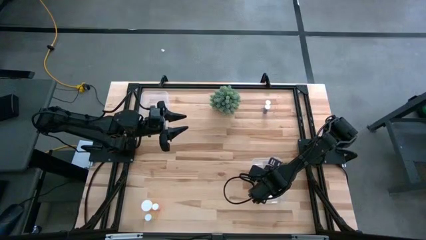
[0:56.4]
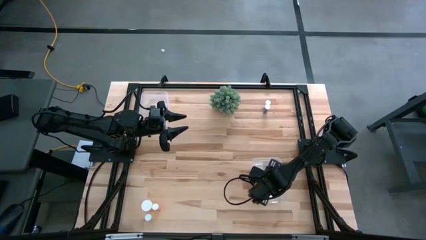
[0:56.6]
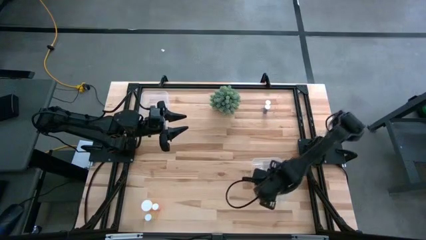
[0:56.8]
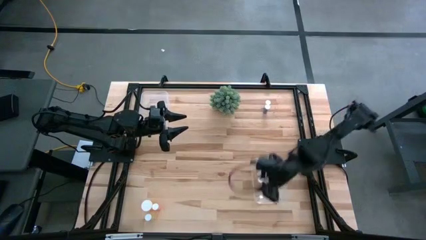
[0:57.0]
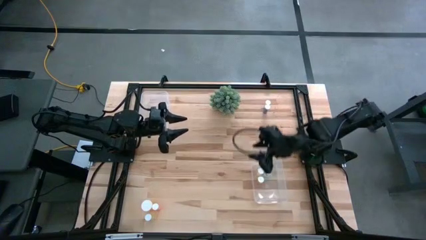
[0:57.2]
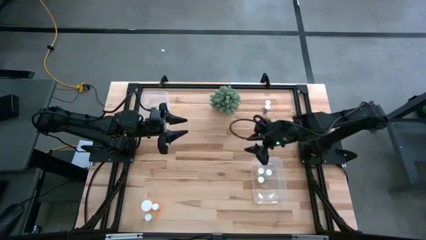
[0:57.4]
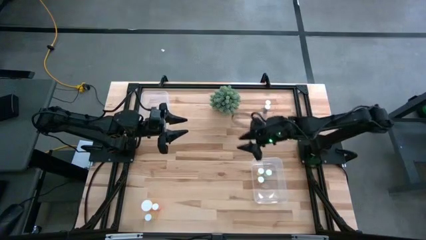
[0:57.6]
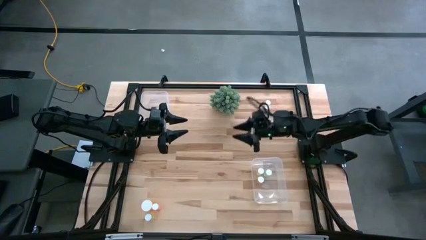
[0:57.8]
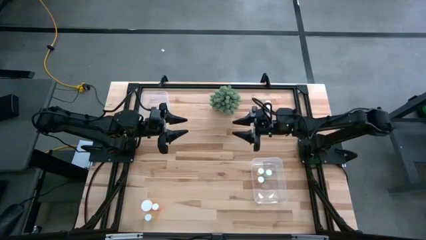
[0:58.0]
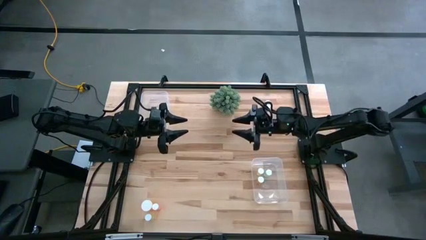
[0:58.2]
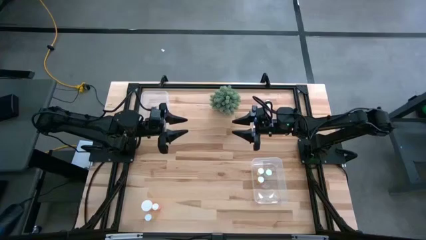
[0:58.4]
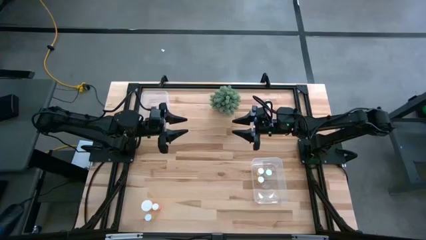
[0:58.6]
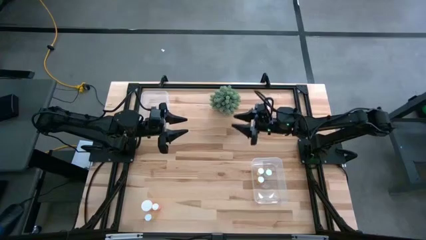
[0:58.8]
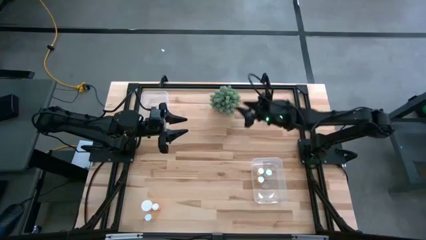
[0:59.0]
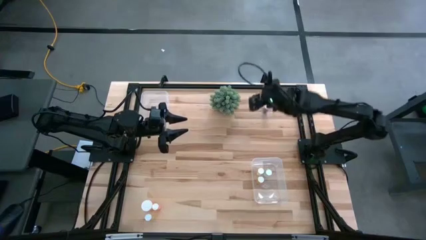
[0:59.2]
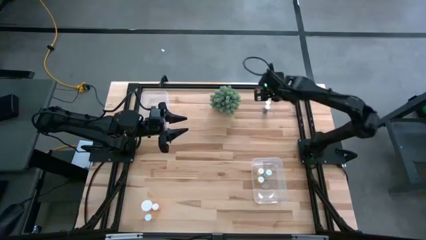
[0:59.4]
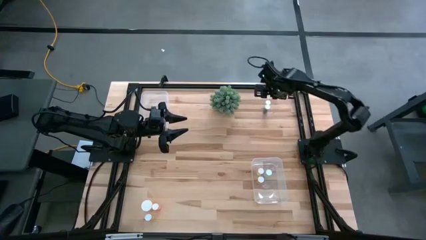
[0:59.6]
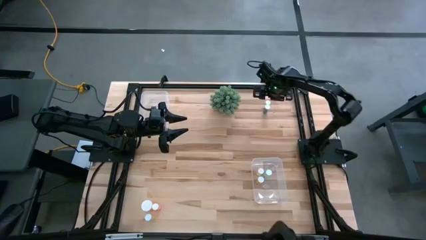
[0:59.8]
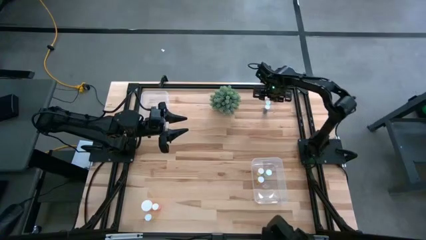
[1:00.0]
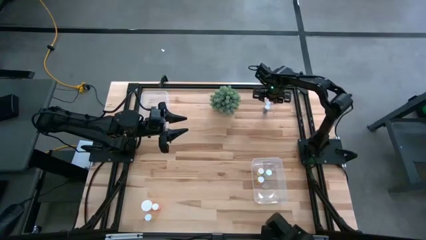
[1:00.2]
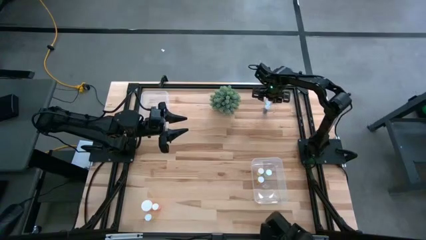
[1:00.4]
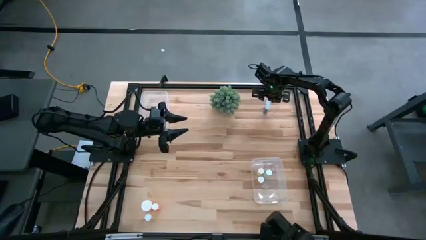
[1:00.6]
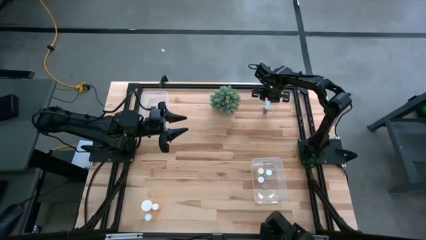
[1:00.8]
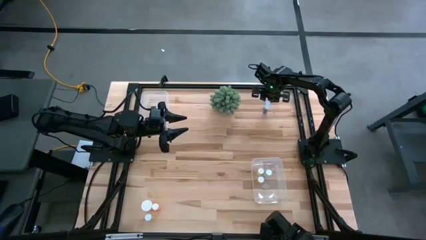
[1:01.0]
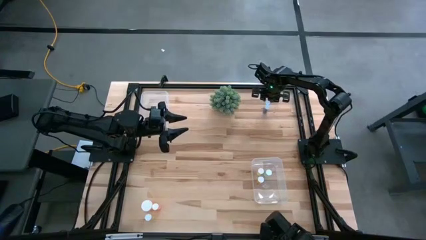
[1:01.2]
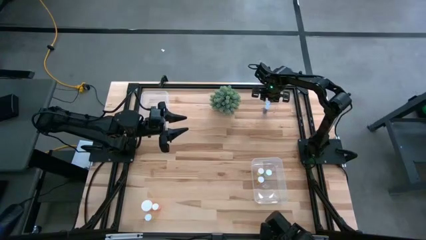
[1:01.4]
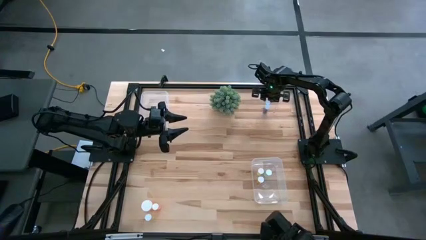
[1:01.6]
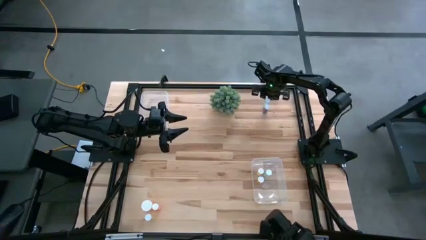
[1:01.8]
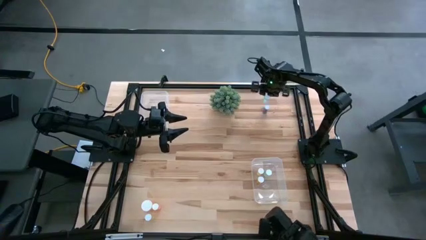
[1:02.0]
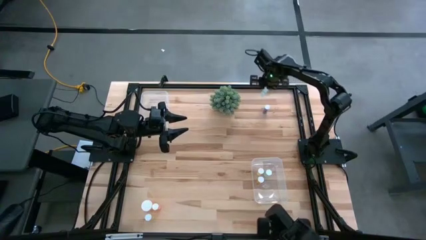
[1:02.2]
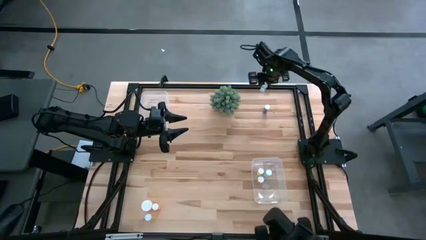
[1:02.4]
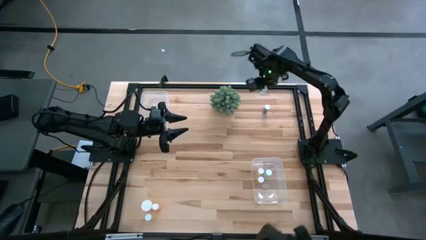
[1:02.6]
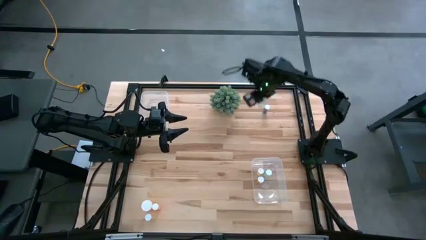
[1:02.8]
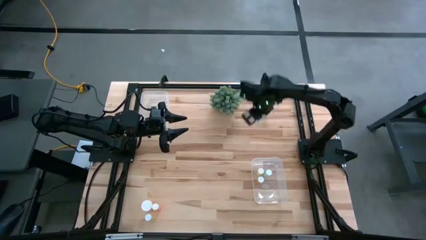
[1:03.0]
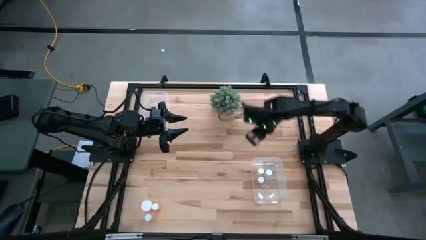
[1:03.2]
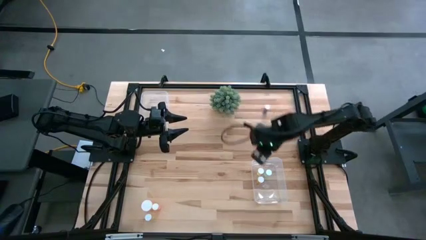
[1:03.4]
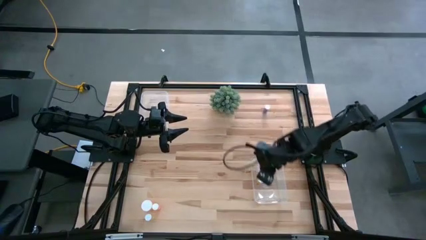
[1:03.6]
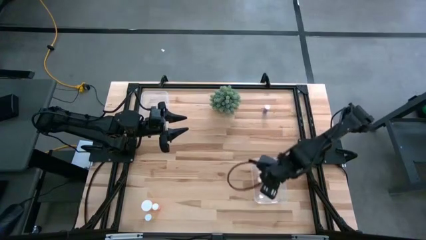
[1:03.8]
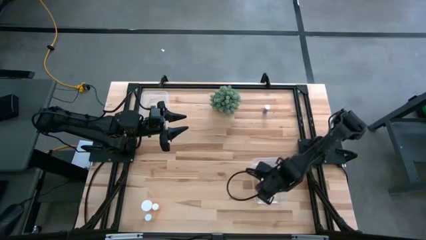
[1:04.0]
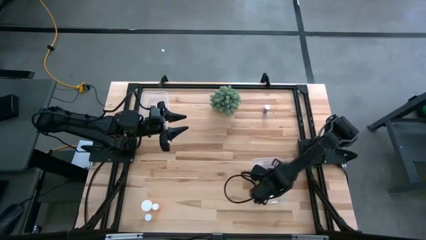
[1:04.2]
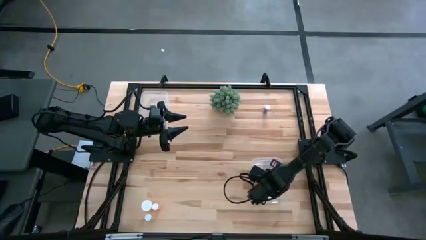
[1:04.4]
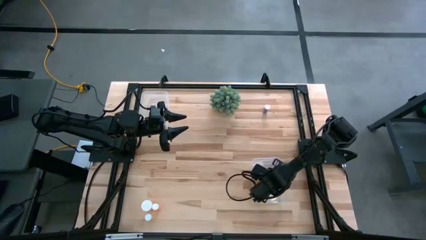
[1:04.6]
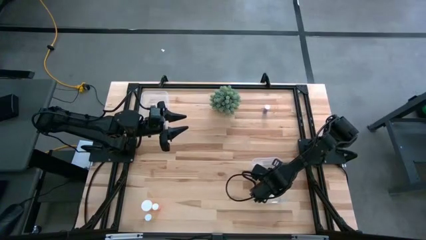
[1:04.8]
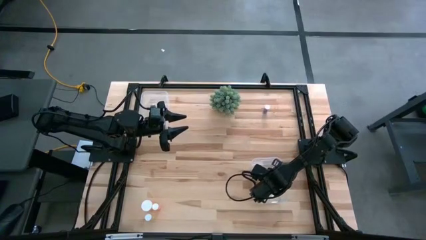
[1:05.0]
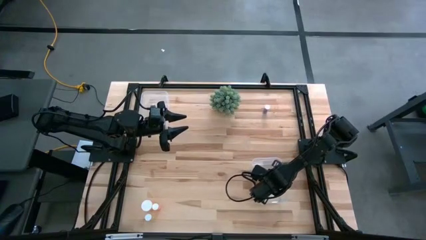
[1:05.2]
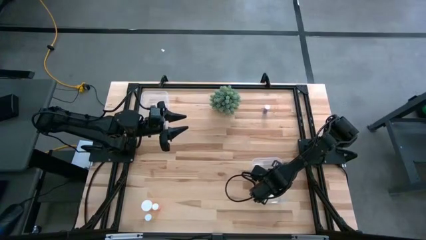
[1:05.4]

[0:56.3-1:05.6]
Task: Pick and place medicine bottles into bin by pill shape (circle, oval)
Put the light blue tablet bottle into the right transparent bin

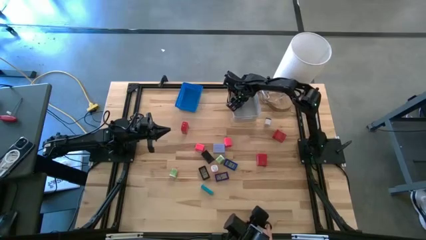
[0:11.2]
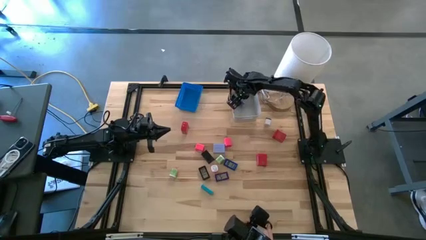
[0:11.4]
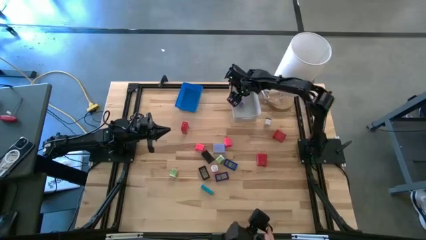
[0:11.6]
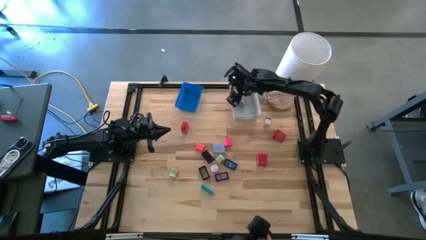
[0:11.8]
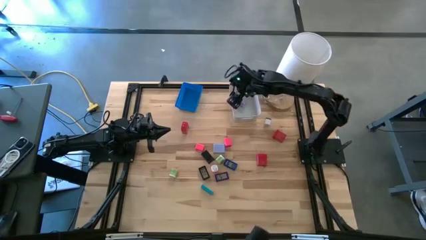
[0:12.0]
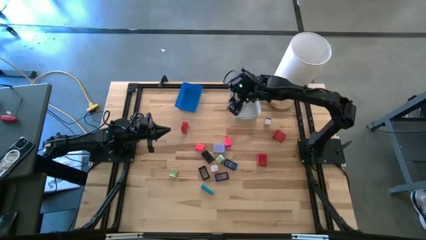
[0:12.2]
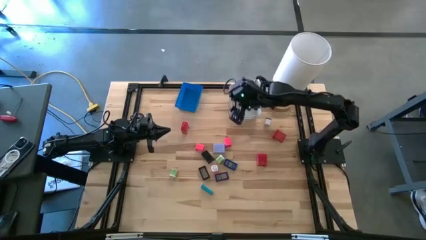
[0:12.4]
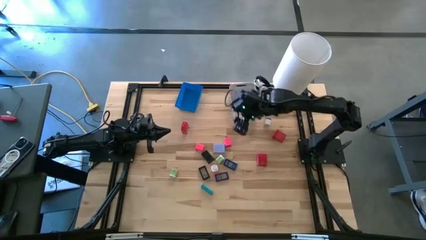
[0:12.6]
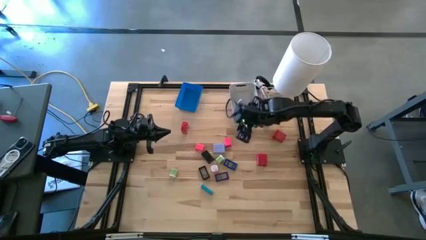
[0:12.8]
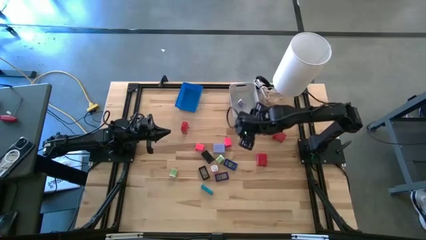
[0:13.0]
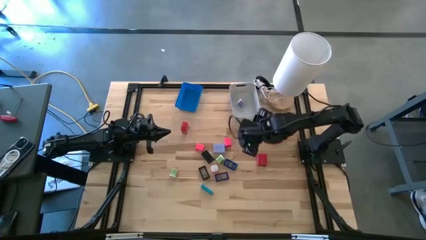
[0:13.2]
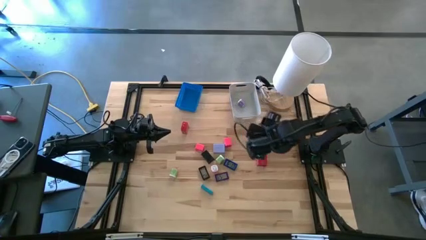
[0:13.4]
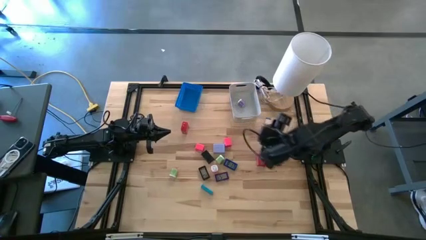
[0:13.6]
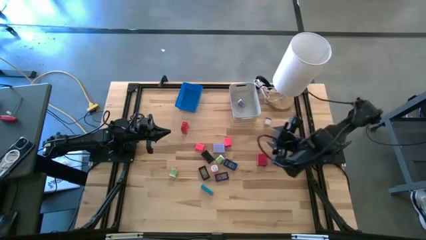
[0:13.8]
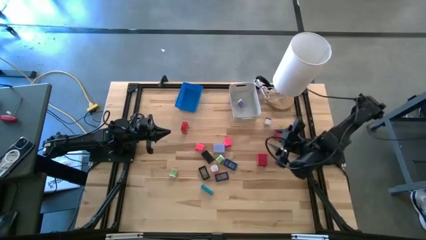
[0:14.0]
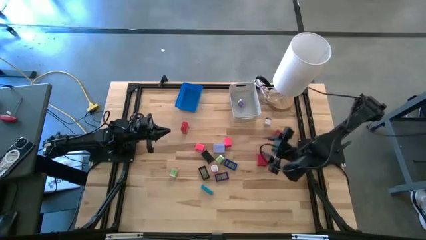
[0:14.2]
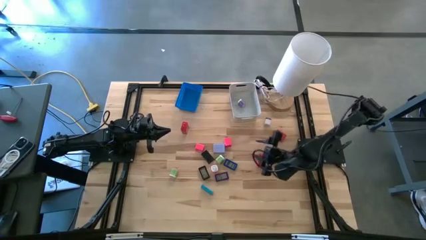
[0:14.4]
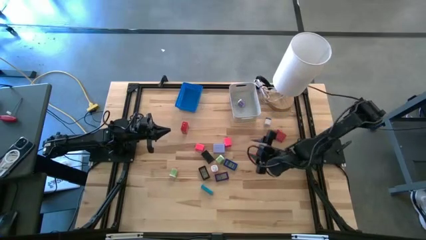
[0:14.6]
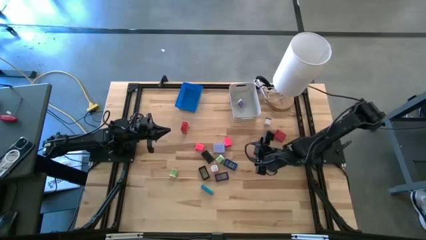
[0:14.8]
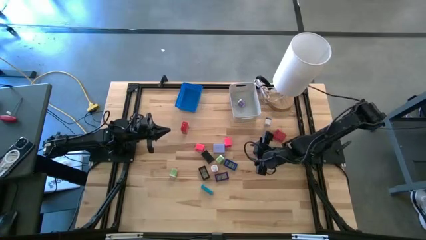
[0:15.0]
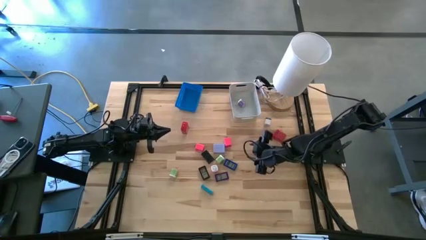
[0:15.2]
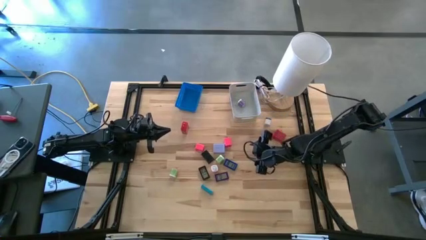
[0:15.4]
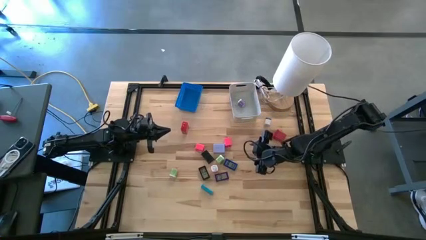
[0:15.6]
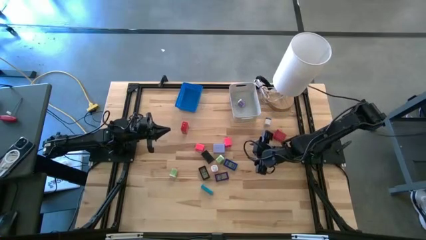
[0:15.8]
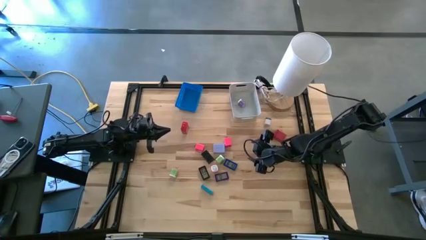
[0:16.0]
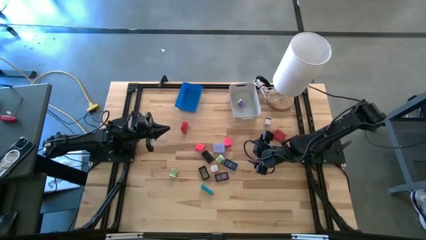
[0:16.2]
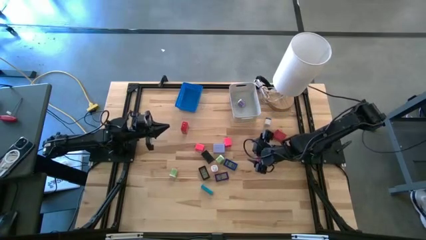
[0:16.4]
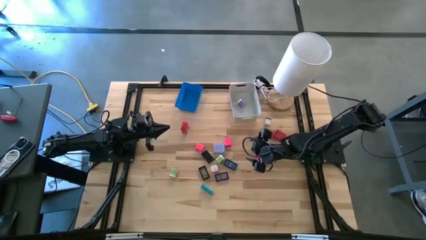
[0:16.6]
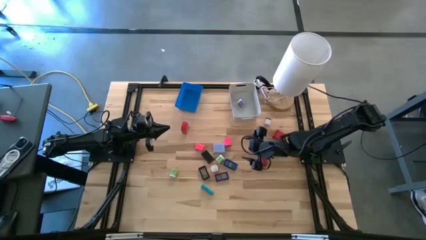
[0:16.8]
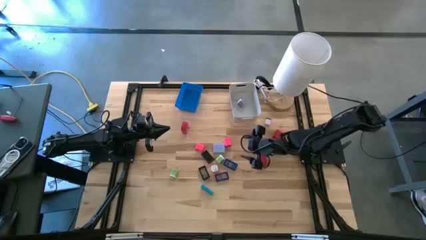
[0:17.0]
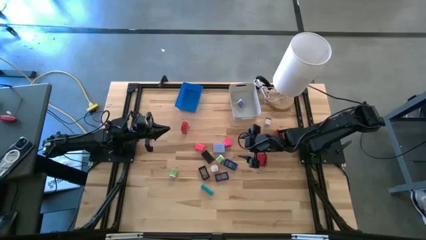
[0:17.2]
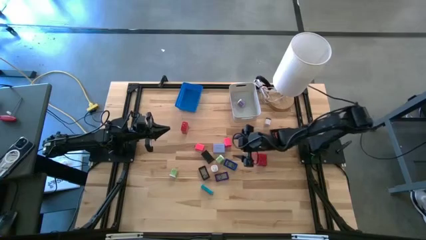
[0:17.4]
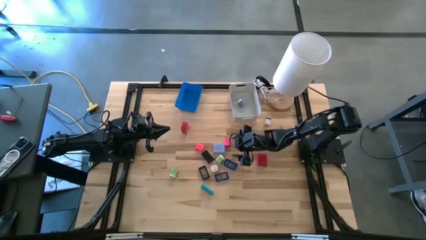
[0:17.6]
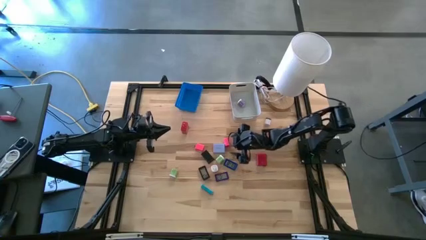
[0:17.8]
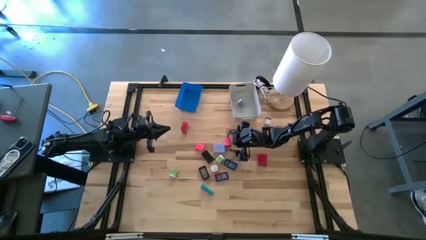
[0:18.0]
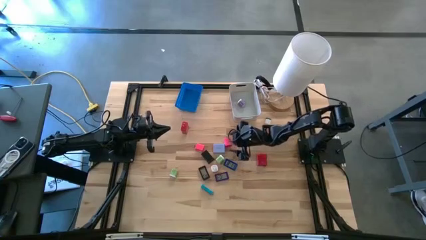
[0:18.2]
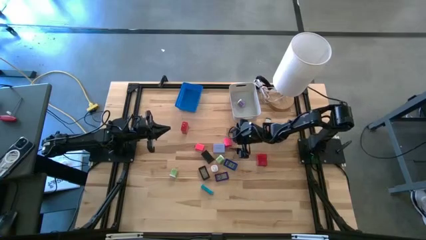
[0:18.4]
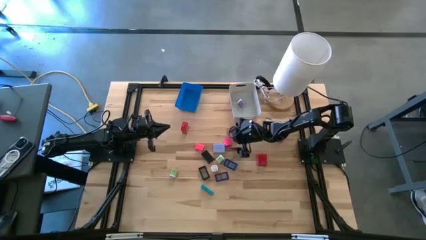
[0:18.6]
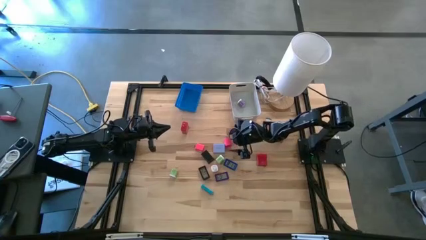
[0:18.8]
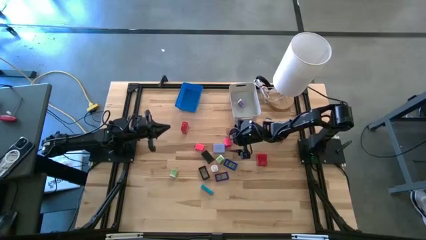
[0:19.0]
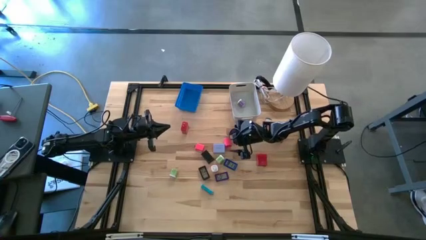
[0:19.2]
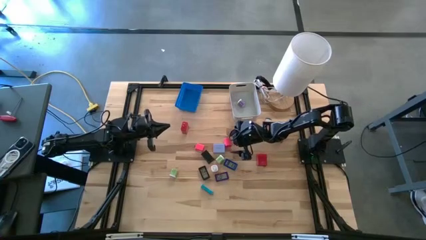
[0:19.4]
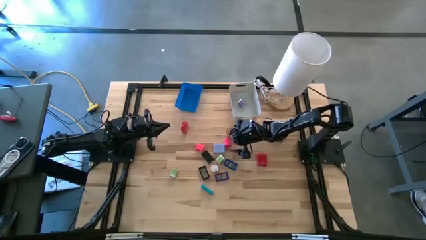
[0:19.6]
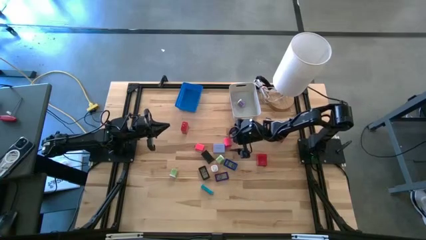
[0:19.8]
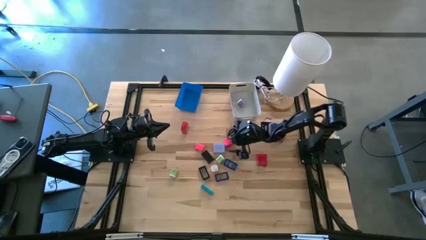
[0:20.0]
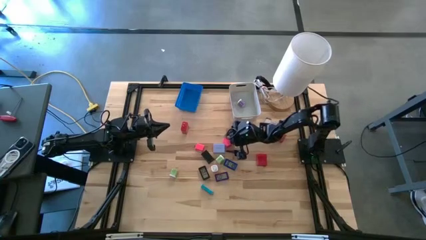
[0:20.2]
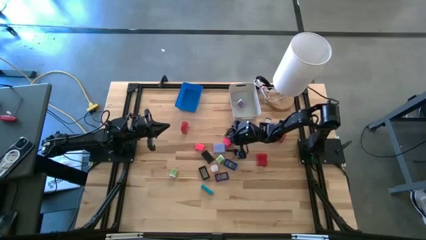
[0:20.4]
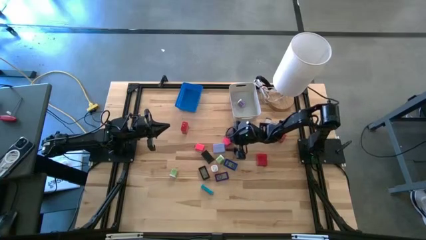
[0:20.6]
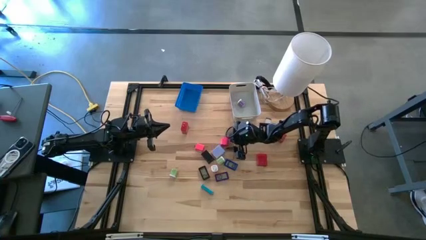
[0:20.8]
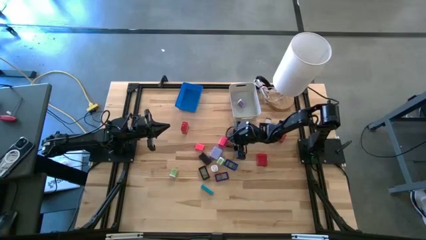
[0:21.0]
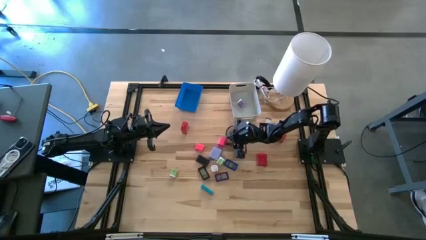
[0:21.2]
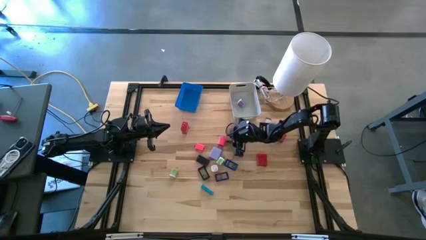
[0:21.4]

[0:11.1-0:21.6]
Task: Pick & Place Office items
Put the right pink charger adapter into the white bin
